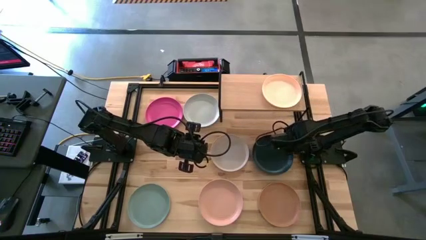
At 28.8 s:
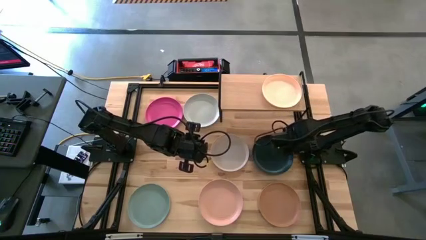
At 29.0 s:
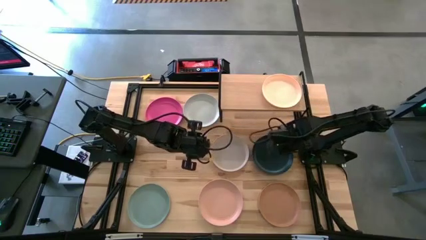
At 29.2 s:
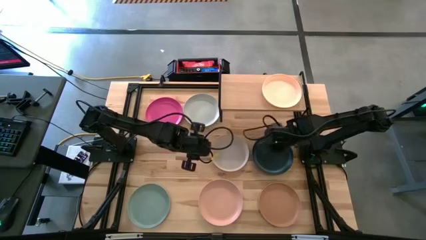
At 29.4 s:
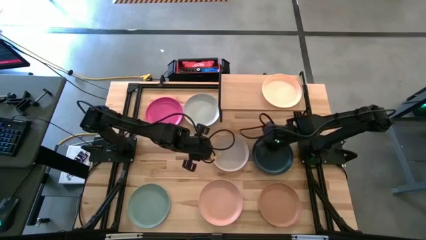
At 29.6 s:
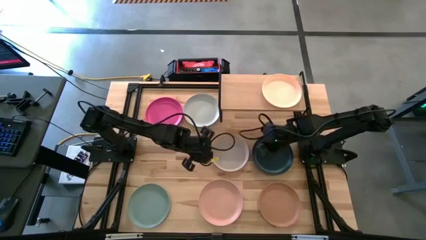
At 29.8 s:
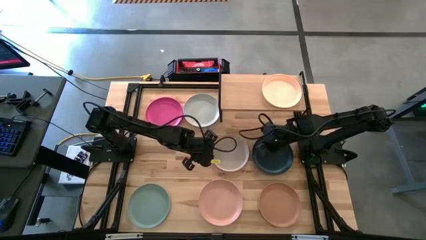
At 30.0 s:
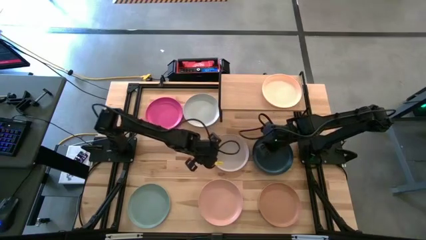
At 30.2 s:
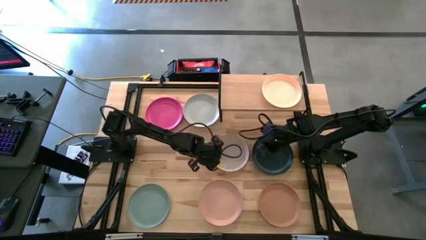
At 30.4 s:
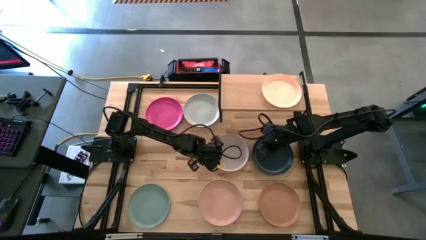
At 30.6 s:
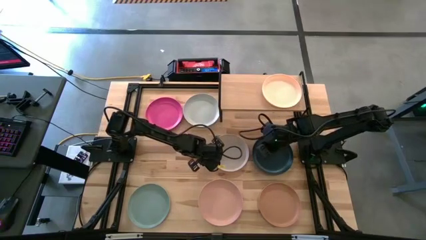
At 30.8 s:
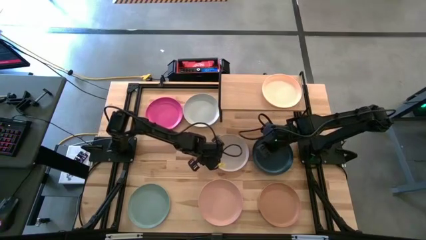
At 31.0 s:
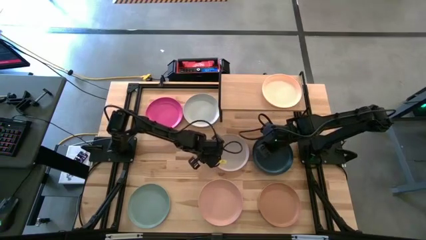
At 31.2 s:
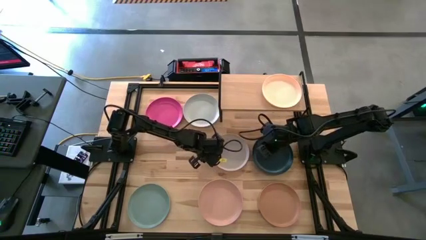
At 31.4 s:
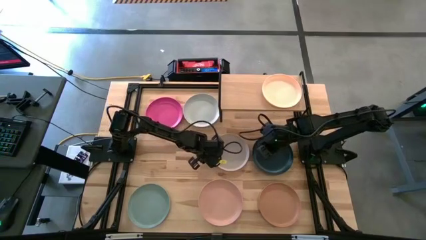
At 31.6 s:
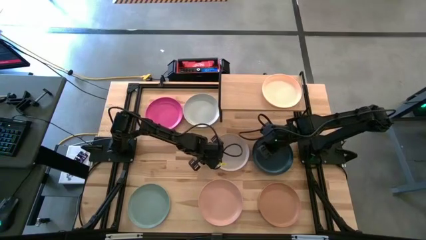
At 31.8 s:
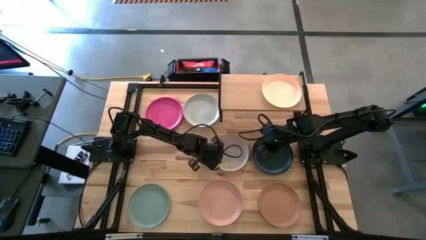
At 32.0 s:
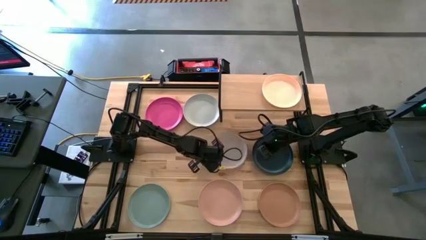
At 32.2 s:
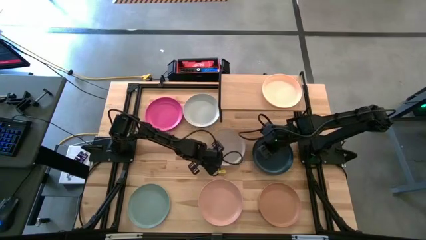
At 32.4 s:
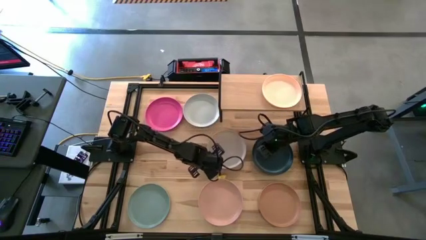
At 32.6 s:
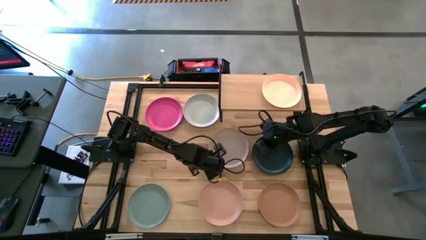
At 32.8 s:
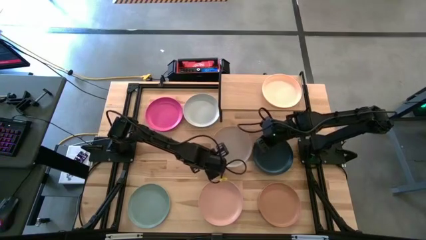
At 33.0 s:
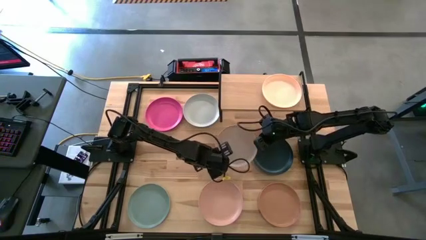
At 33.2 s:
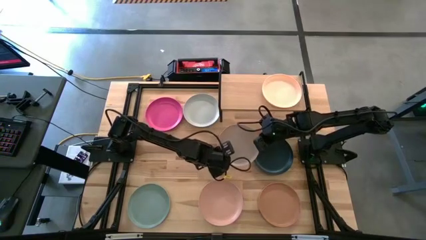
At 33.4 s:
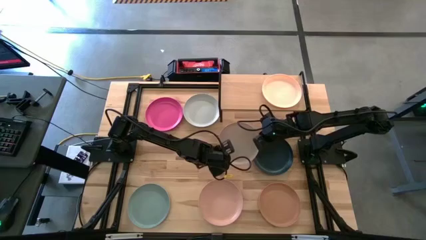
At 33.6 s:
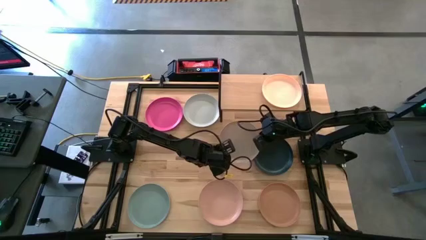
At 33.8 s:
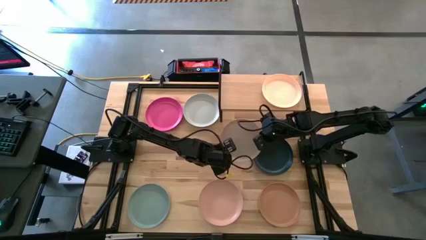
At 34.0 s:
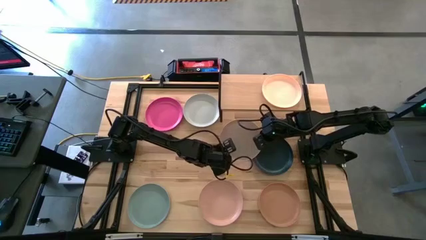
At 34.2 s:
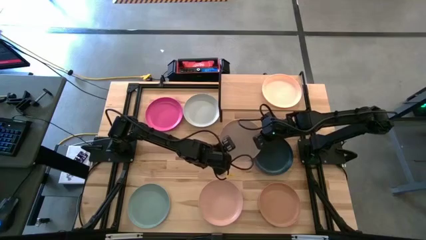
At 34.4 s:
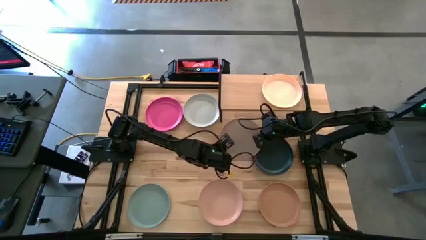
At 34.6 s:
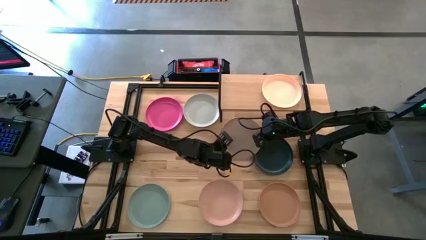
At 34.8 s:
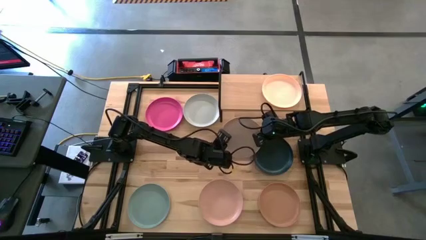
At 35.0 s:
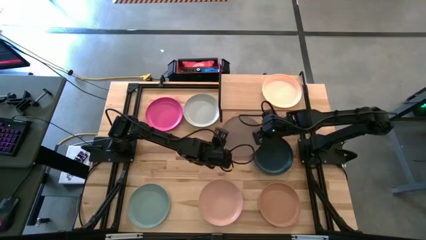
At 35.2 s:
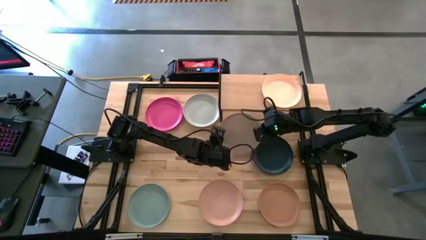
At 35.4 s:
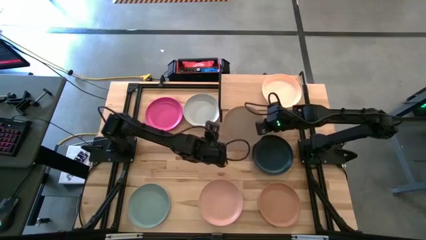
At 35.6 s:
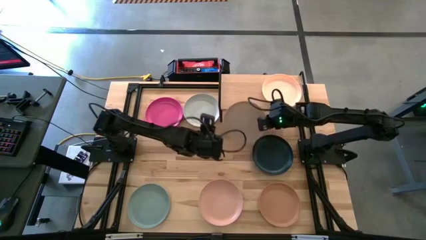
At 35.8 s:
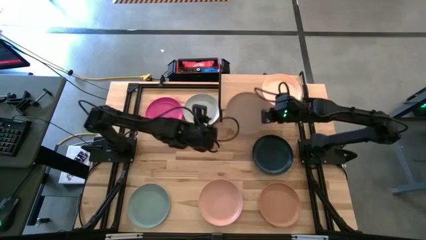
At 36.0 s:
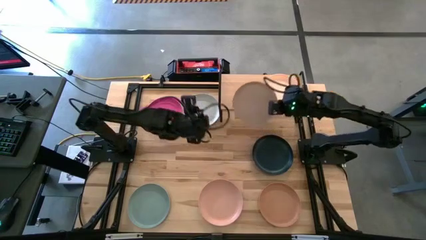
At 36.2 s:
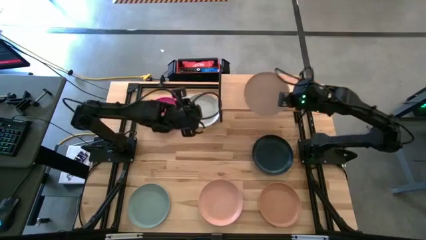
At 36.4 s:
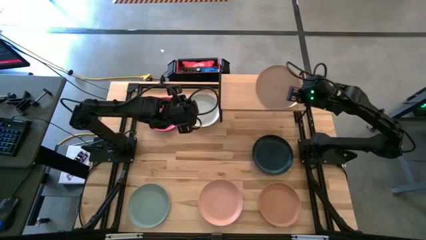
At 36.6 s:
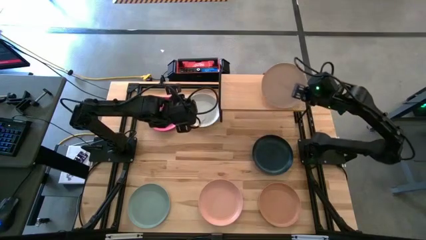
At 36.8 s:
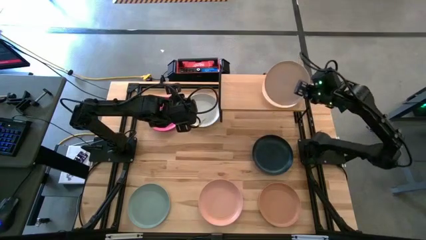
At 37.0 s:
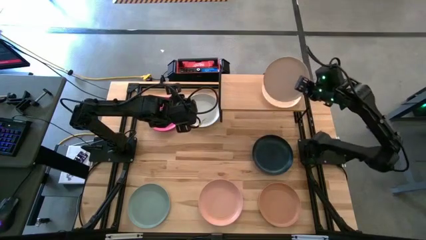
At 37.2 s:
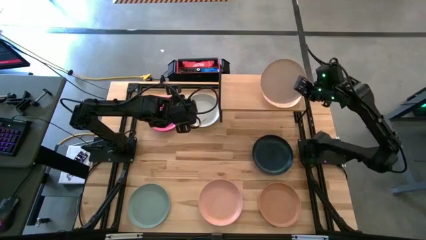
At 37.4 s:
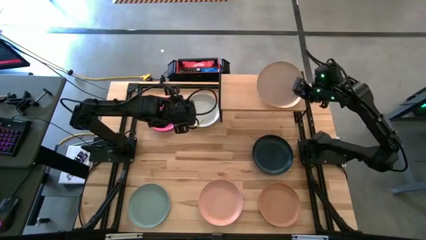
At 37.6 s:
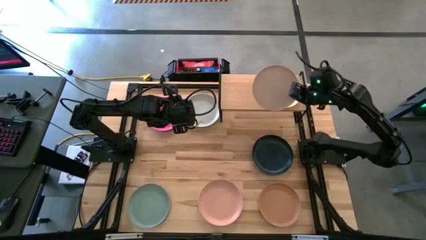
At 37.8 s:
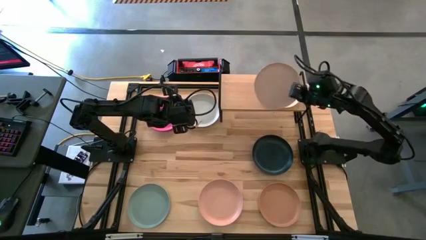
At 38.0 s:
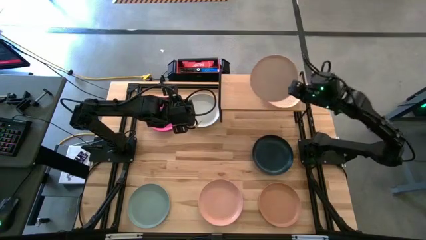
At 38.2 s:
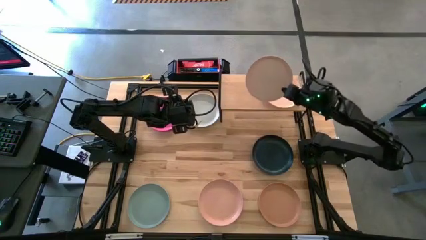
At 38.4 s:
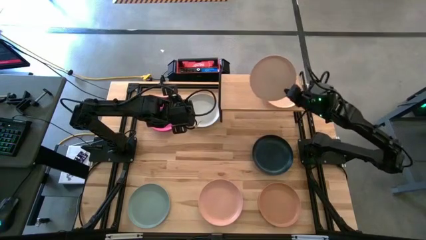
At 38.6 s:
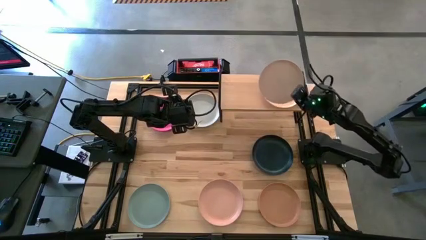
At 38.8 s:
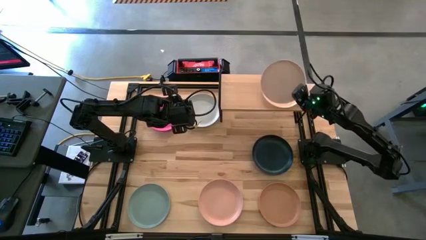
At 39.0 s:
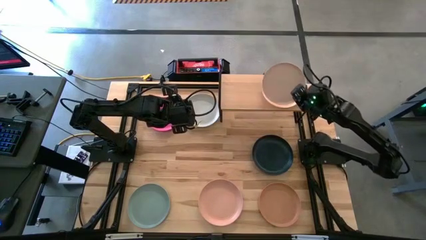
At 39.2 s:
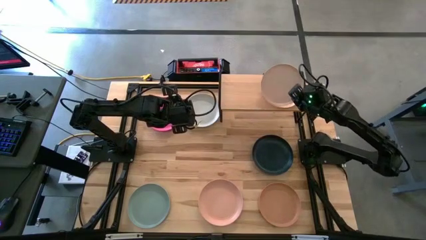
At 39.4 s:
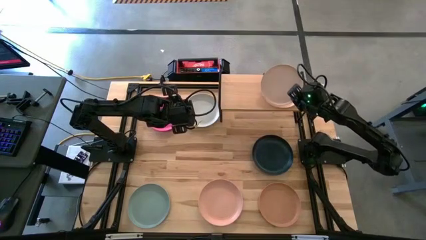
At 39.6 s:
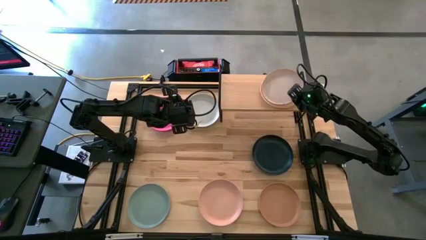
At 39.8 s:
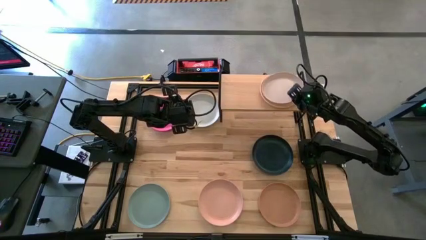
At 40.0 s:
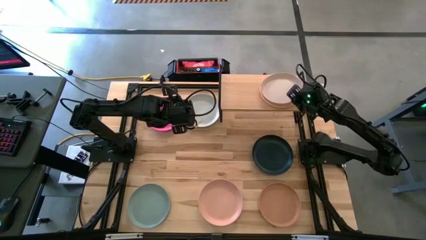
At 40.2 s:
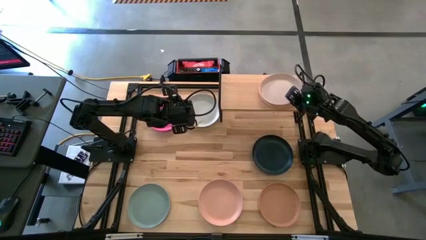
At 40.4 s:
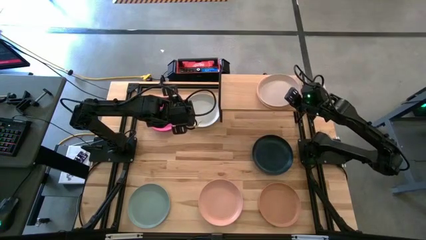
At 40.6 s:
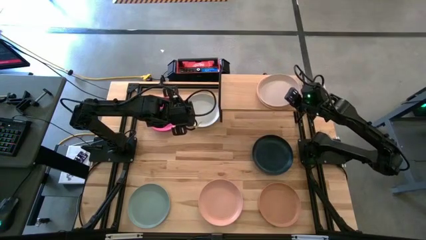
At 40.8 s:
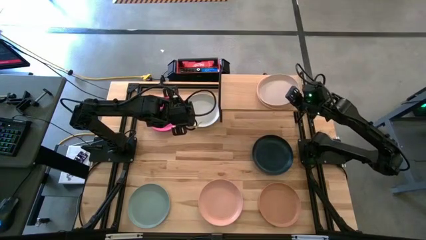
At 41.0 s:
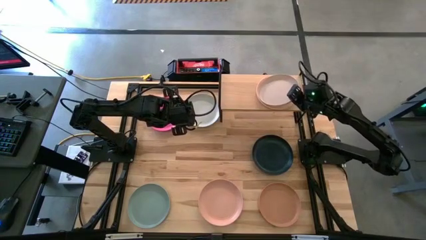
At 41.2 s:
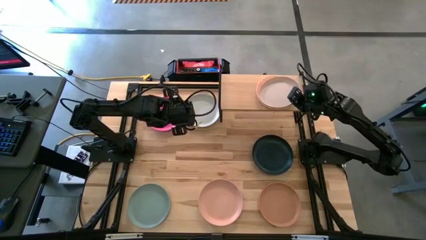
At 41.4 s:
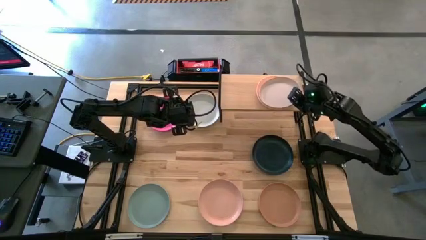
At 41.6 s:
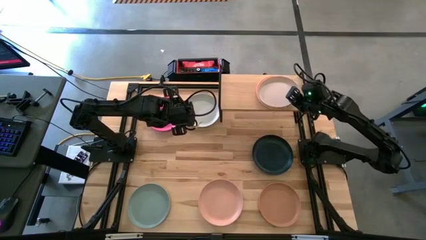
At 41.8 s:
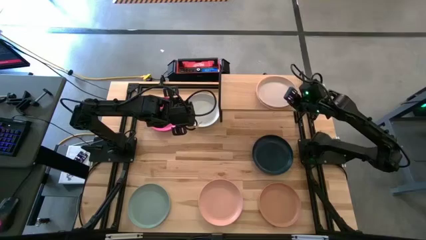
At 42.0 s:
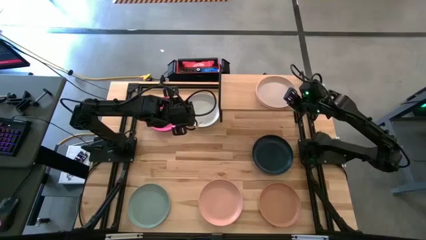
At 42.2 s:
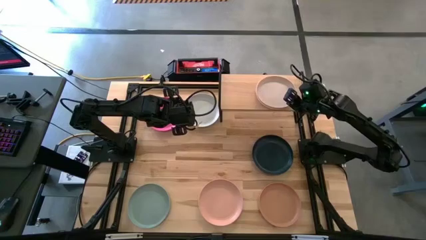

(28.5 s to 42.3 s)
Task: Place and stack plates onto a shelf
Stack the white plate on top of the light brown plate
